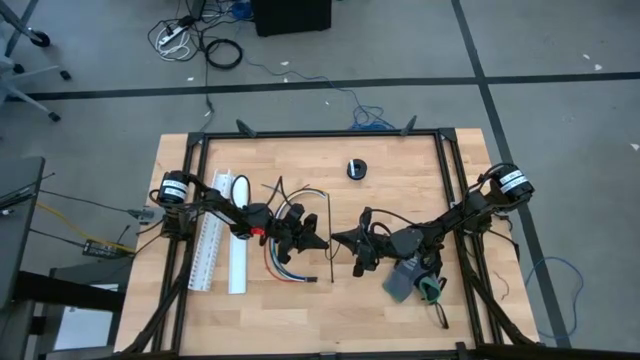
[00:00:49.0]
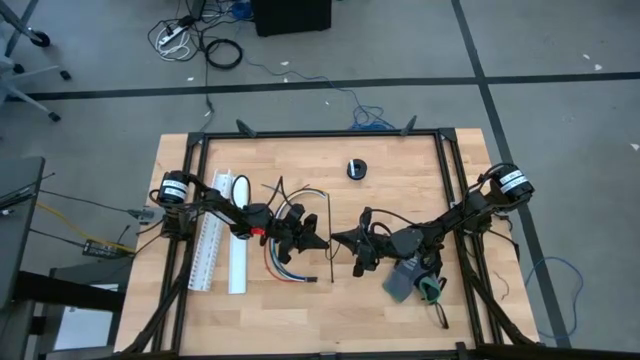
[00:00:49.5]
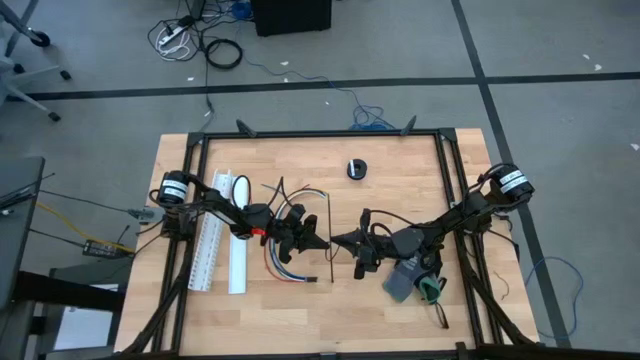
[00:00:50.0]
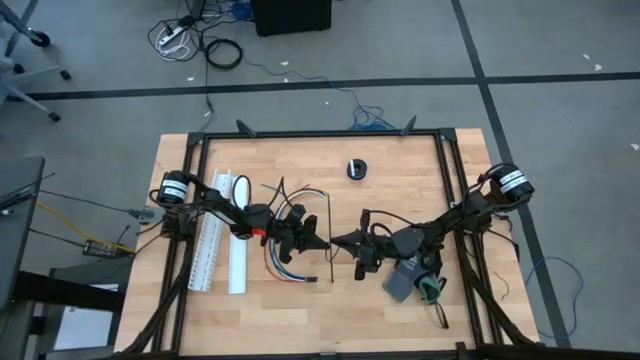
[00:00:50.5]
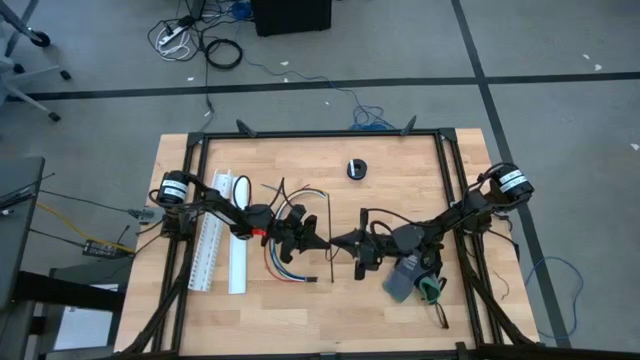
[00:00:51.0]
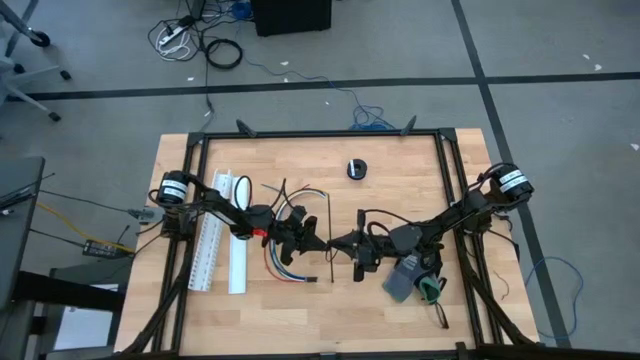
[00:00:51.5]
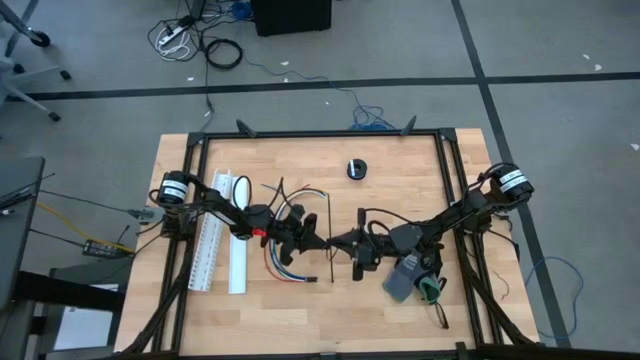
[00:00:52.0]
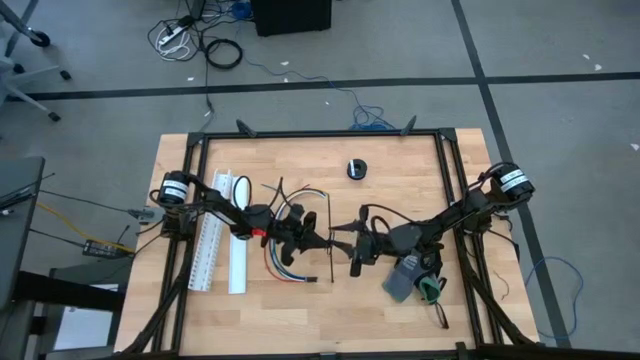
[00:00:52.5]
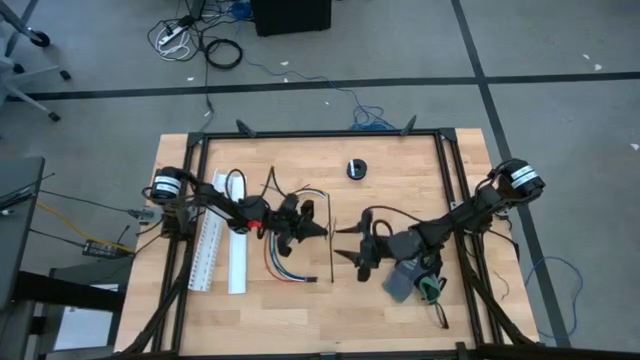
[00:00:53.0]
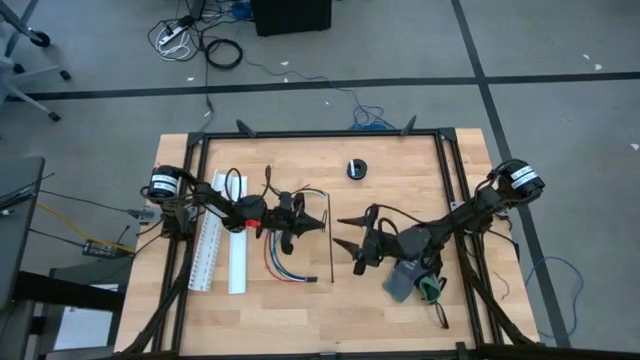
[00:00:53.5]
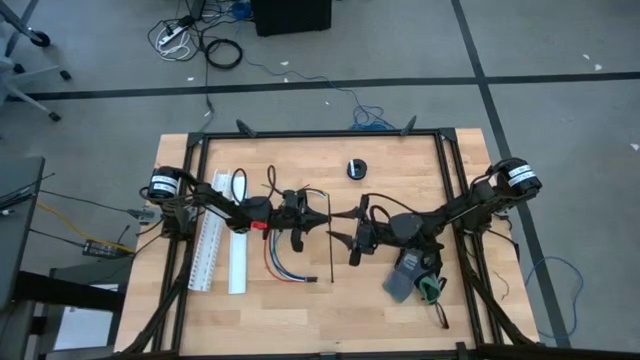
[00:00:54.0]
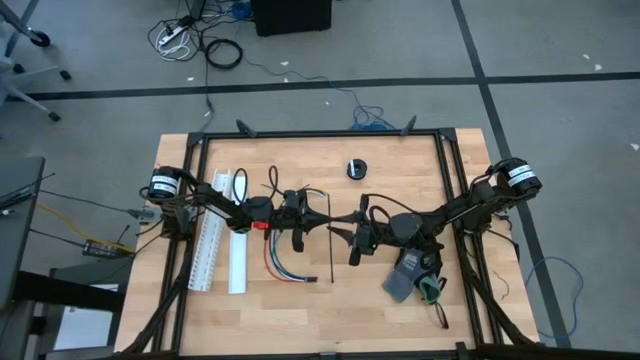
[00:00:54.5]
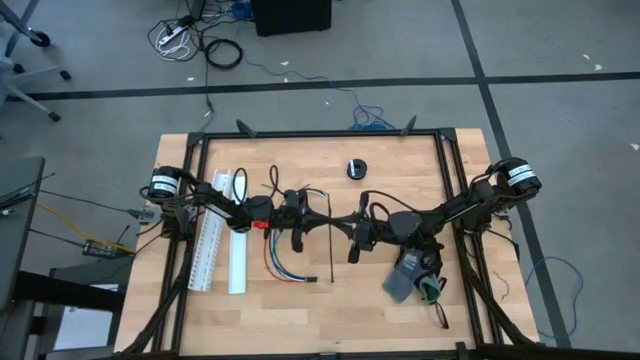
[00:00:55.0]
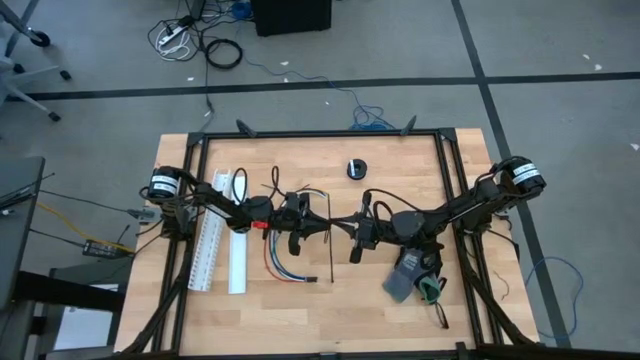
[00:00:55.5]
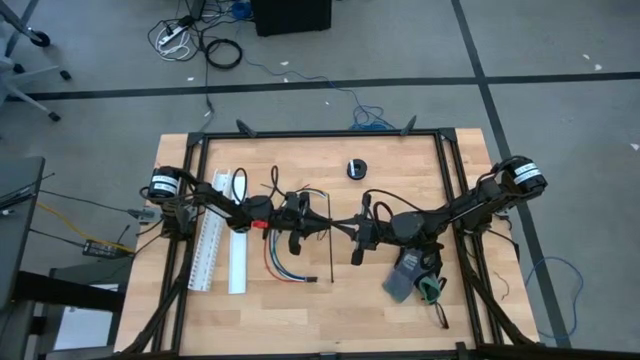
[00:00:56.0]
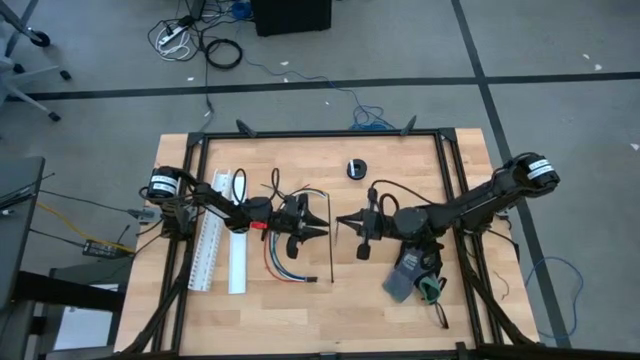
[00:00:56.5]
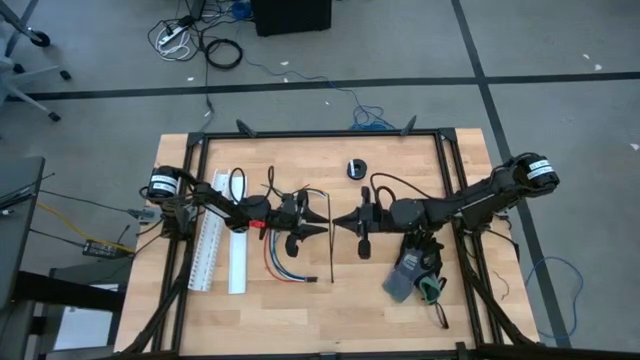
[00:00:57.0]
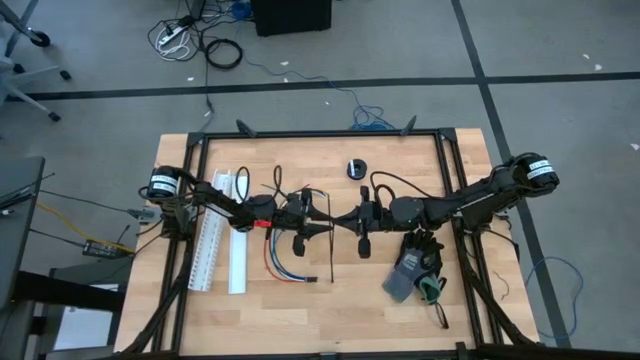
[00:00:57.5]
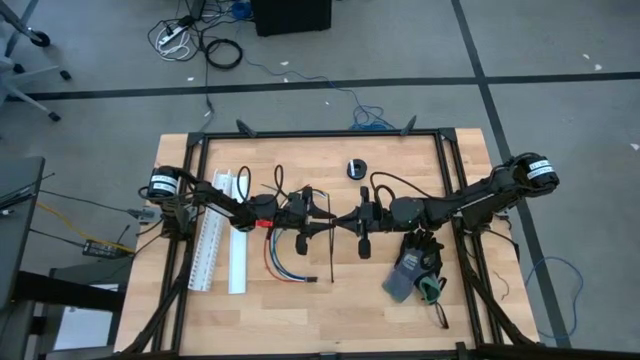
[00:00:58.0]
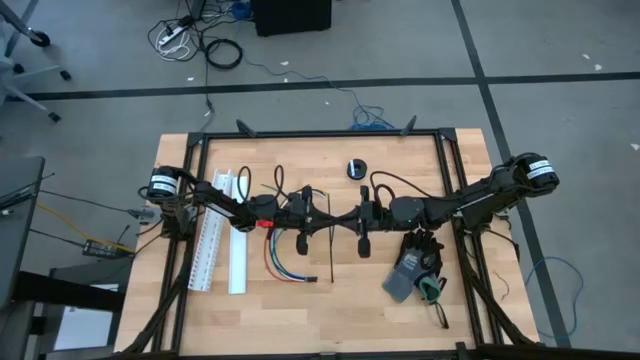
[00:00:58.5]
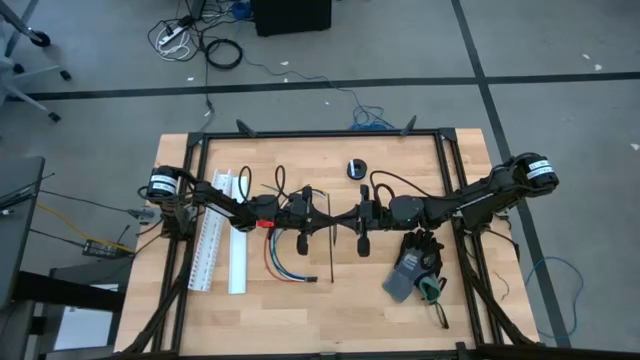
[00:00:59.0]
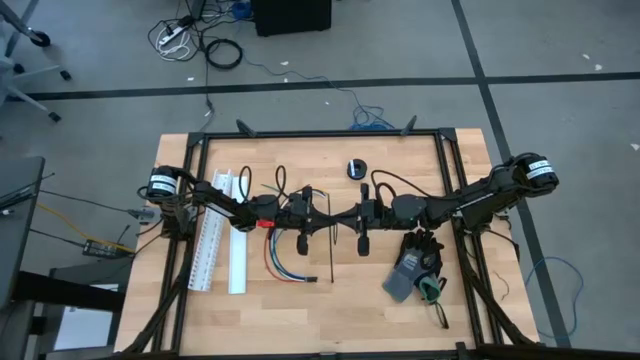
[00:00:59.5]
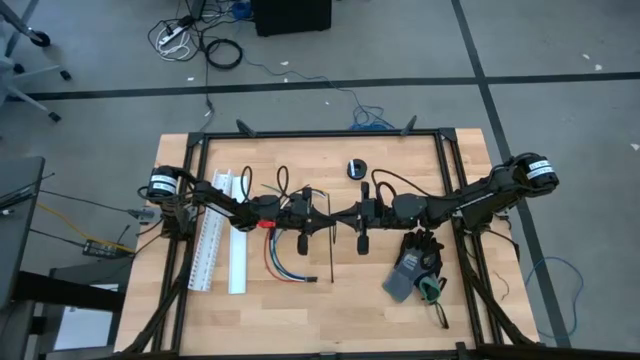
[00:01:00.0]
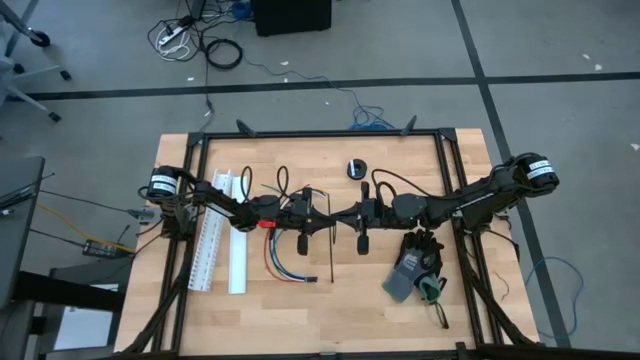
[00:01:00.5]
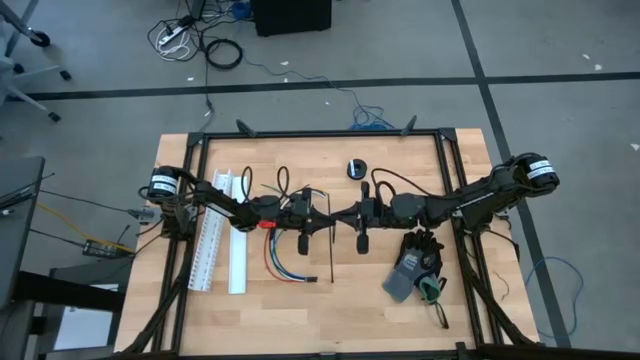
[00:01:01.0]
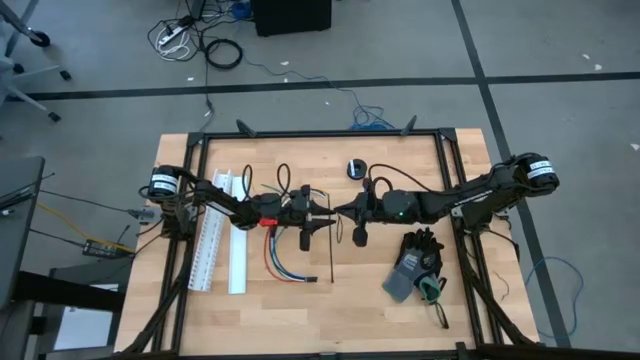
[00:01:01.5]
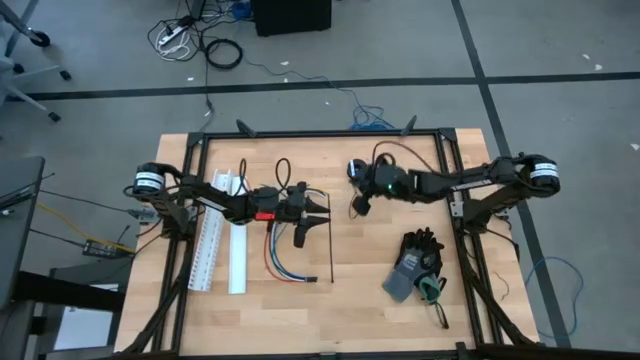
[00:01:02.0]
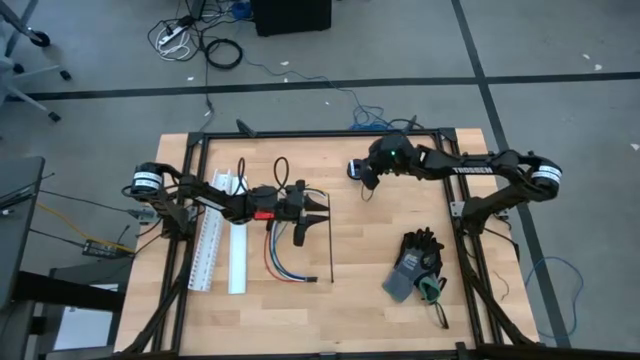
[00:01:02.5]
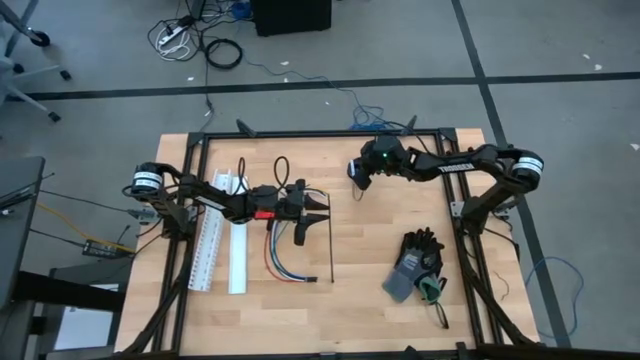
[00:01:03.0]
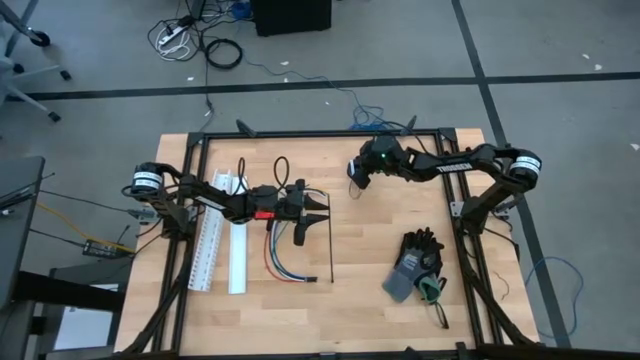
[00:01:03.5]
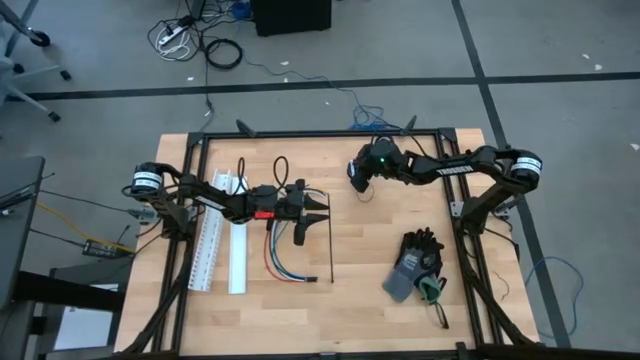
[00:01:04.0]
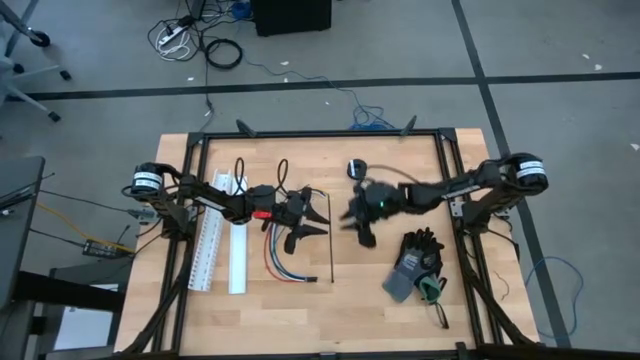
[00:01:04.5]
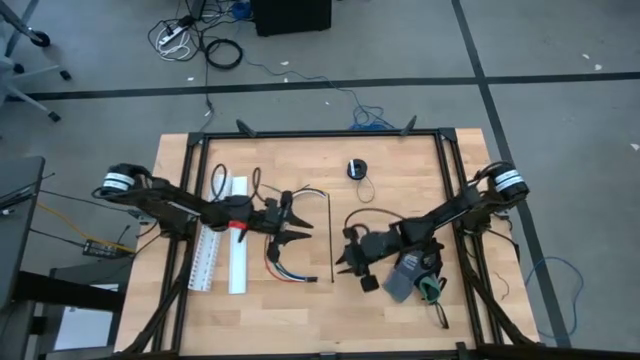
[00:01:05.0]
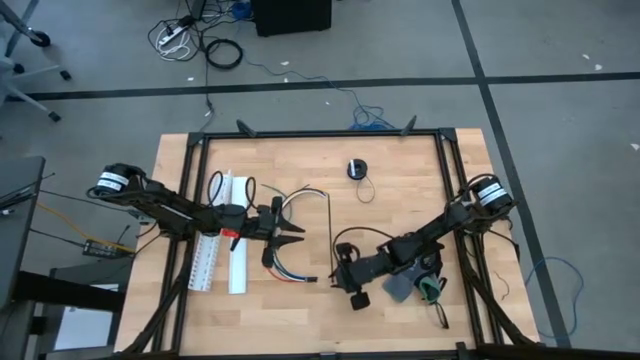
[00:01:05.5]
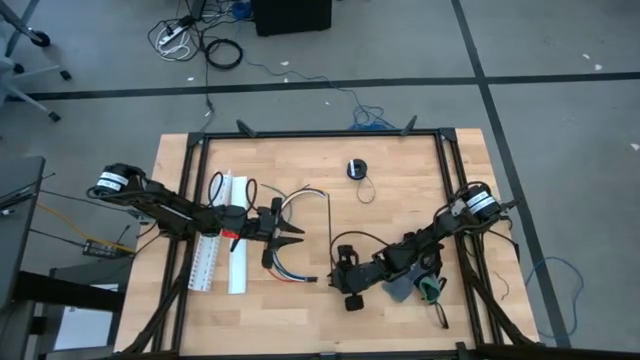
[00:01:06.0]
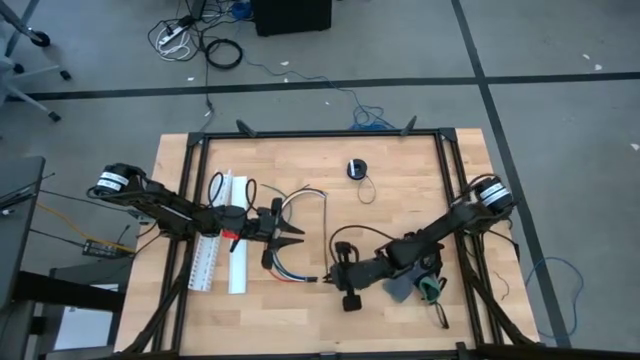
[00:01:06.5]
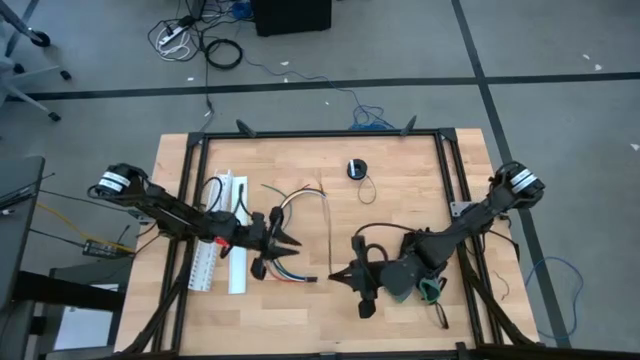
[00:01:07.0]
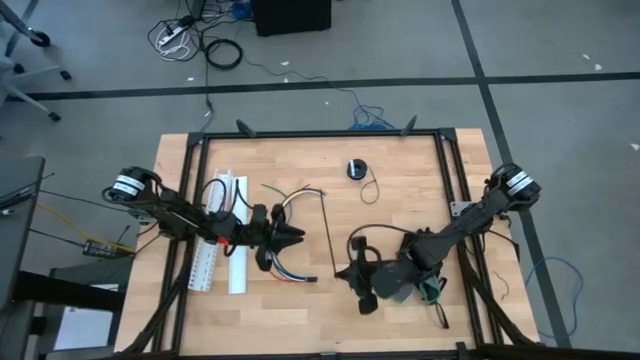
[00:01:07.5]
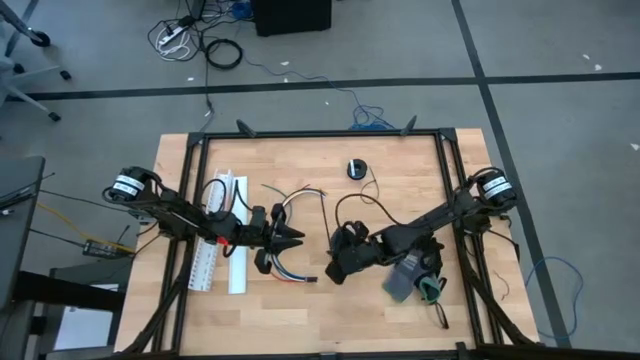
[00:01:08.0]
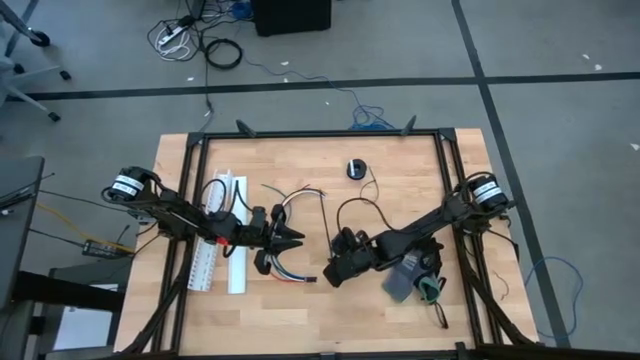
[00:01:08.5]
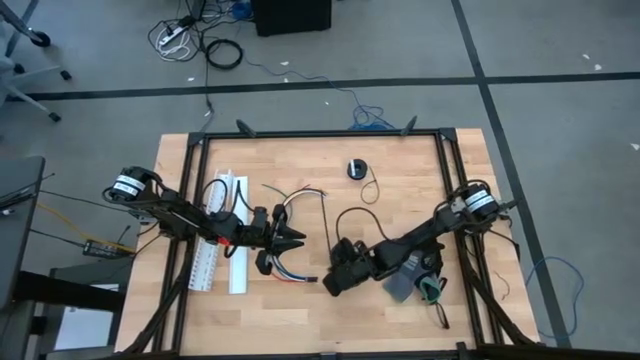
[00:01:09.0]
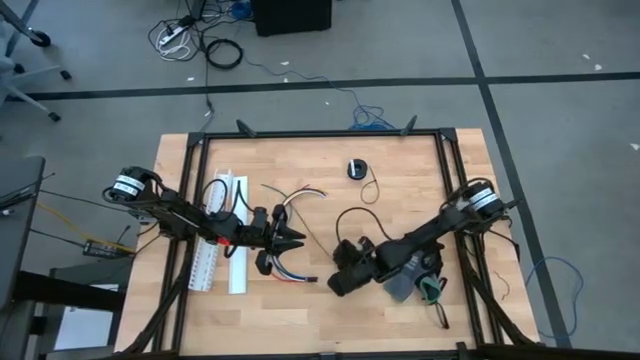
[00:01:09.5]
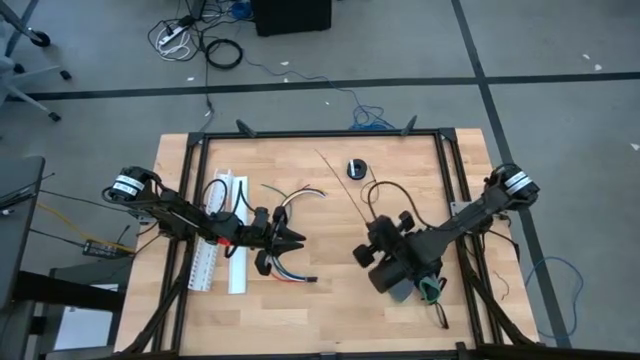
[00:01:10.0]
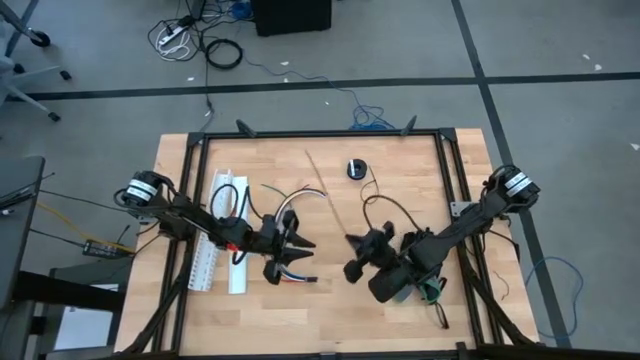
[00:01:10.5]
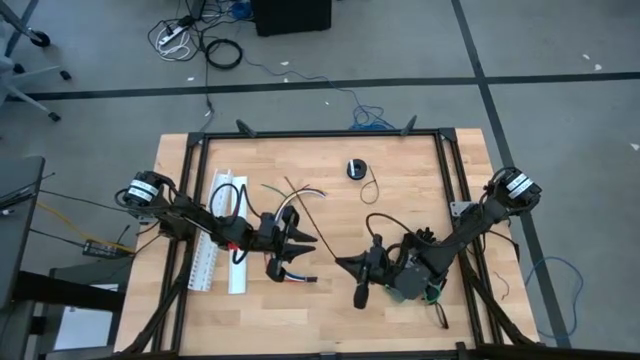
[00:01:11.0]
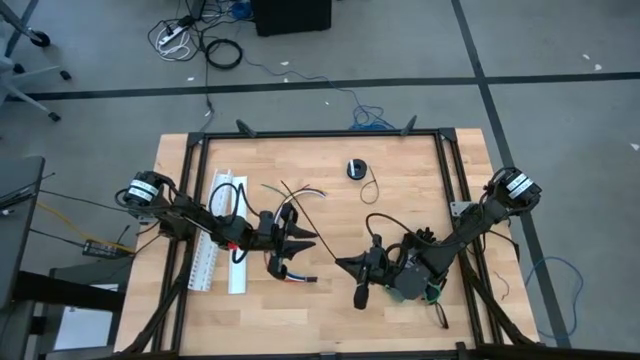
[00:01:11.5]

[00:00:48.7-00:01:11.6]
Task: Ziptie cables
Wrap the cables together using a ziptie
